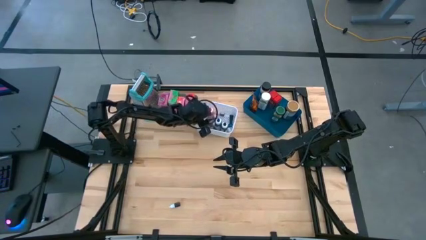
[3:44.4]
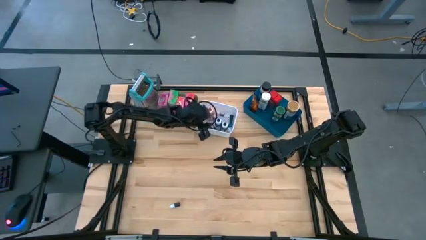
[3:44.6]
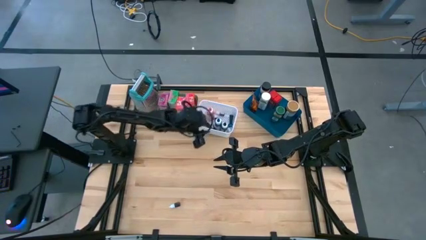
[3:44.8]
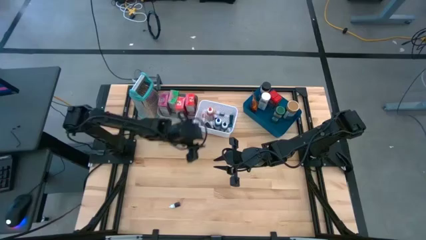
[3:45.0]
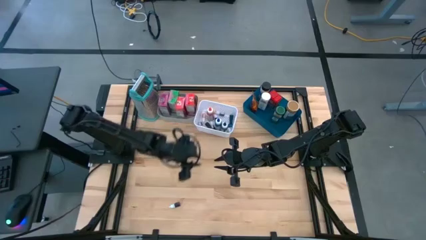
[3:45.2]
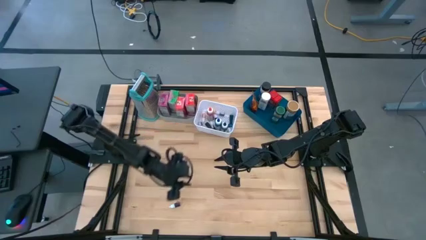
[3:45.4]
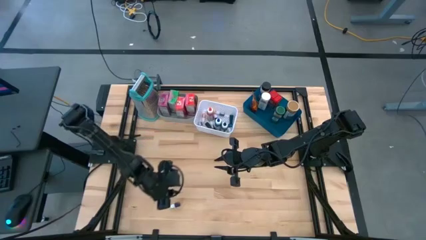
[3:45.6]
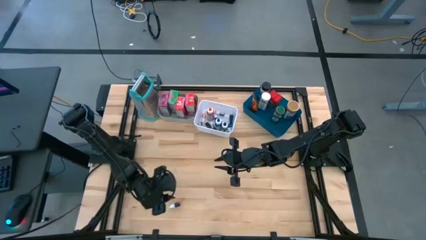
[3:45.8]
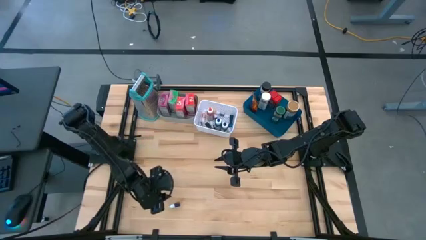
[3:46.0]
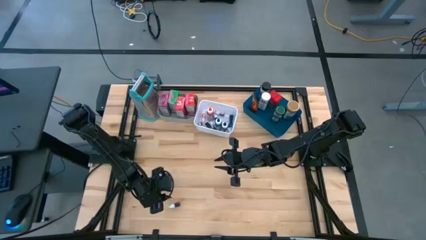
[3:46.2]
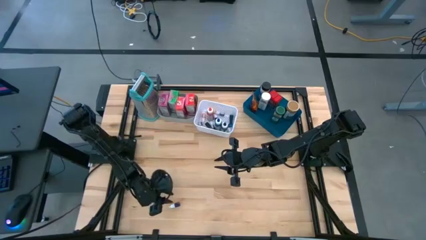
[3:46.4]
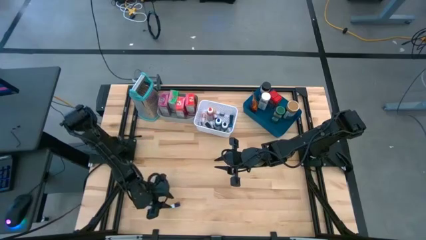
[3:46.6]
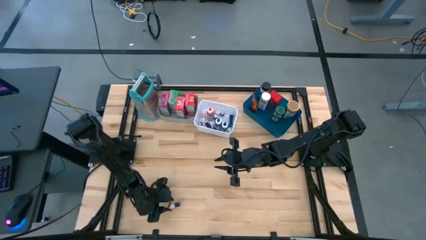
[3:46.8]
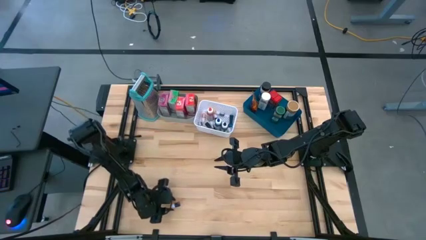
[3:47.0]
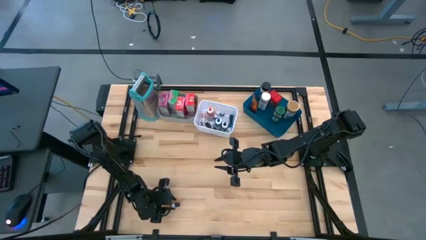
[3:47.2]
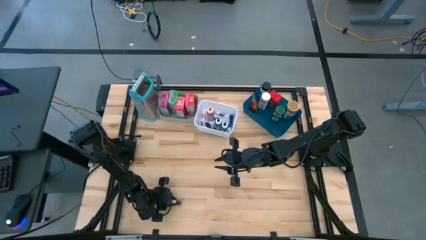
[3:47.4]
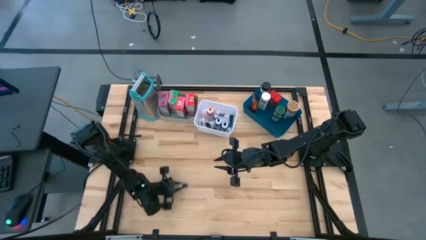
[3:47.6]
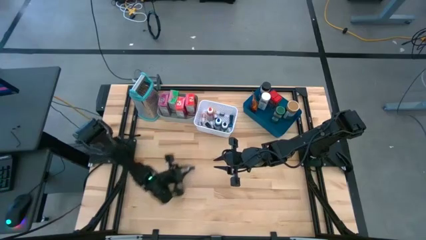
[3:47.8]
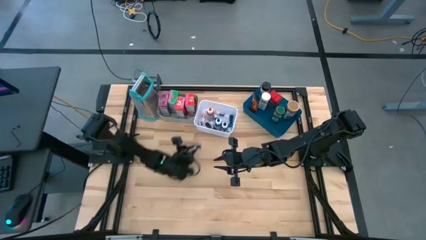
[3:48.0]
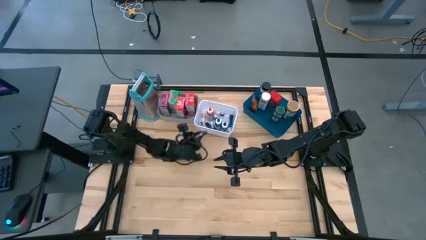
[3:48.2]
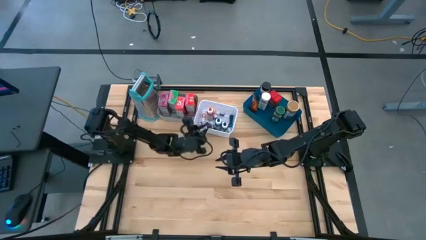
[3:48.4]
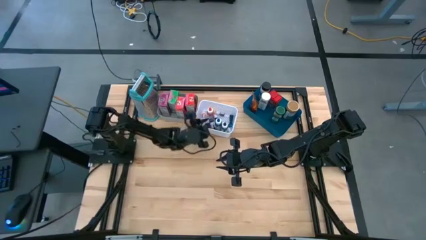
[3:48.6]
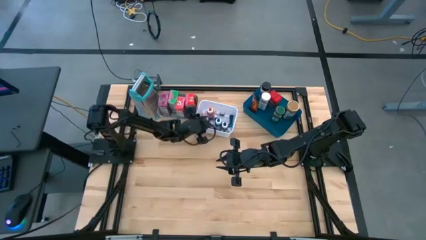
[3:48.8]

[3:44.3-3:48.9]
Task: Pick & Place Kitchen Items
Put the small red food coloring bottle into the white bin

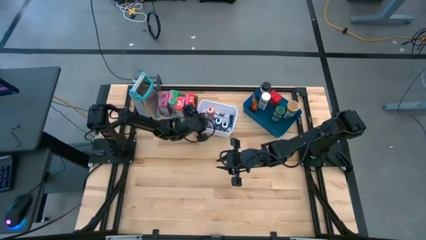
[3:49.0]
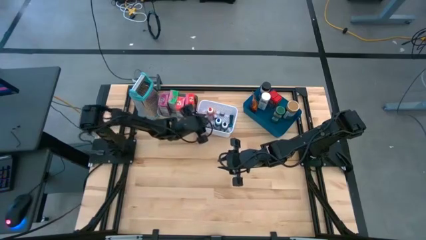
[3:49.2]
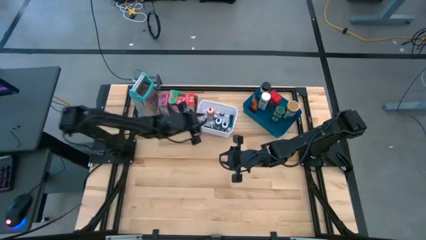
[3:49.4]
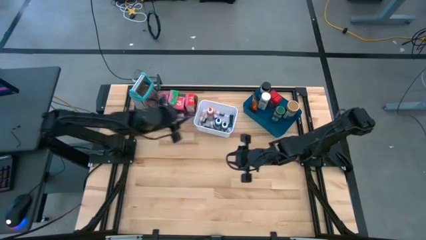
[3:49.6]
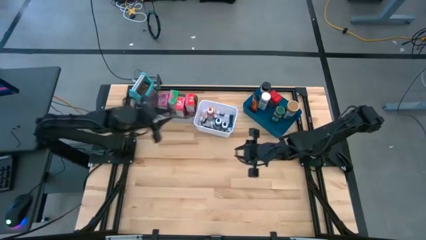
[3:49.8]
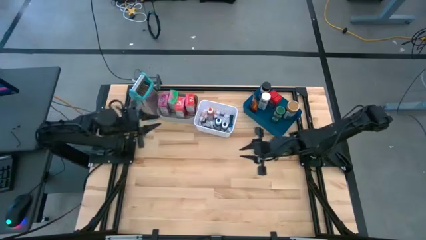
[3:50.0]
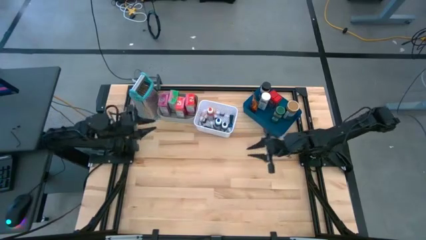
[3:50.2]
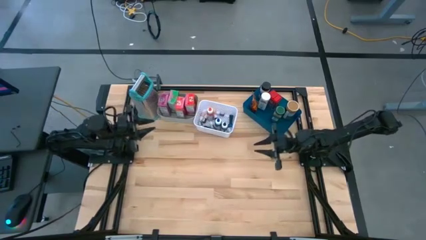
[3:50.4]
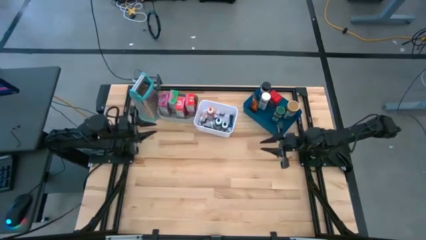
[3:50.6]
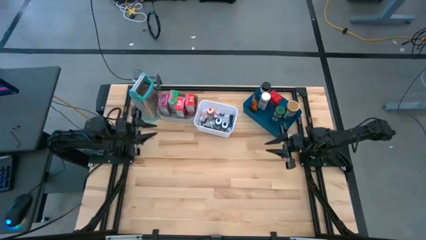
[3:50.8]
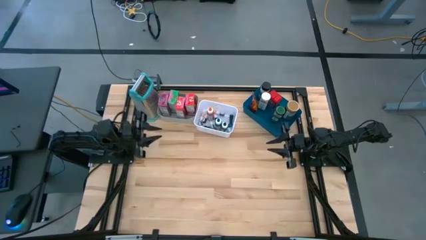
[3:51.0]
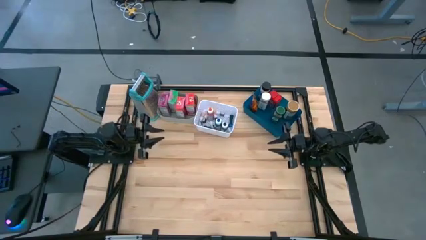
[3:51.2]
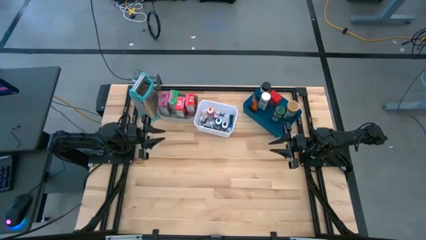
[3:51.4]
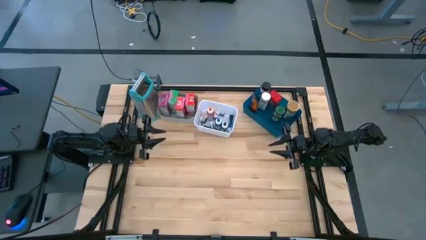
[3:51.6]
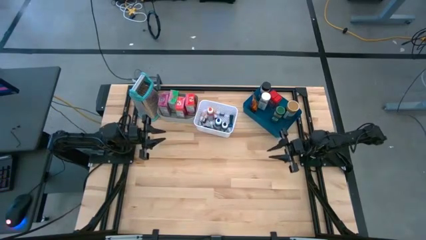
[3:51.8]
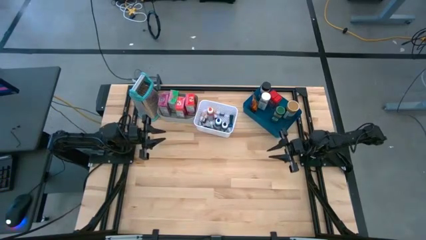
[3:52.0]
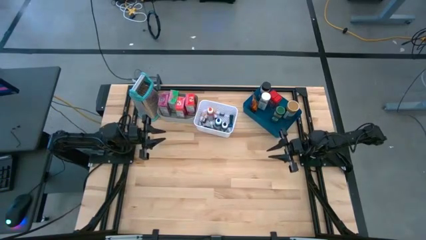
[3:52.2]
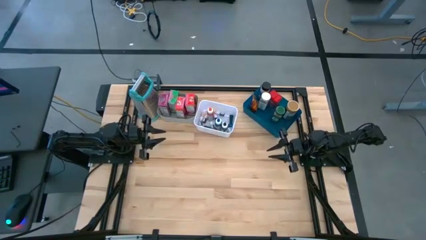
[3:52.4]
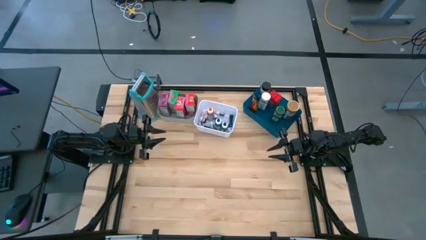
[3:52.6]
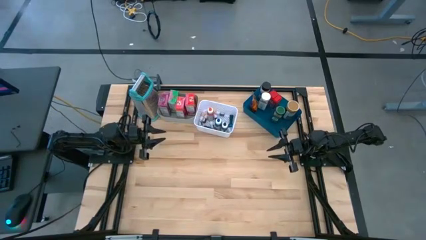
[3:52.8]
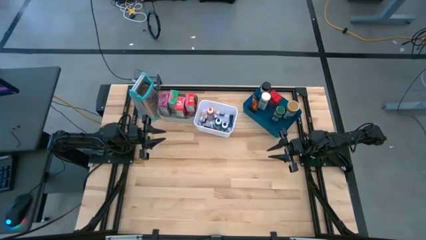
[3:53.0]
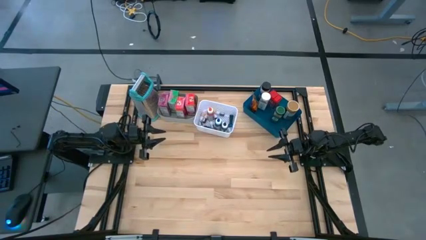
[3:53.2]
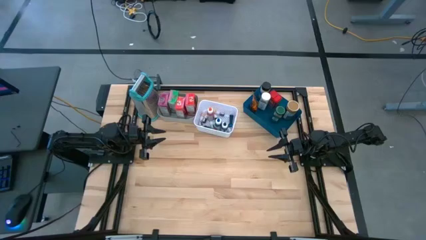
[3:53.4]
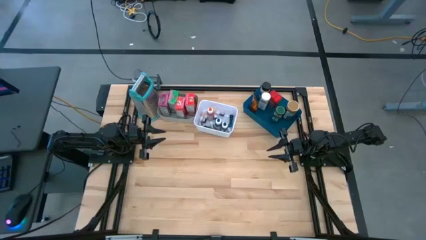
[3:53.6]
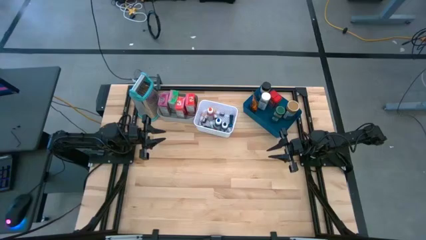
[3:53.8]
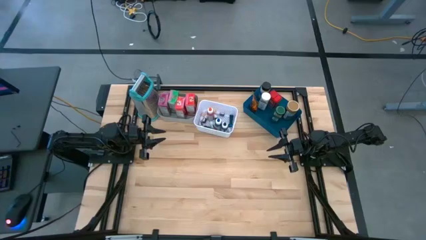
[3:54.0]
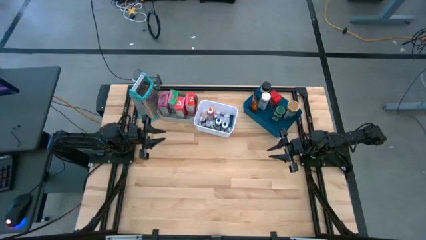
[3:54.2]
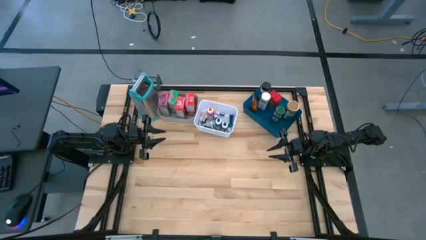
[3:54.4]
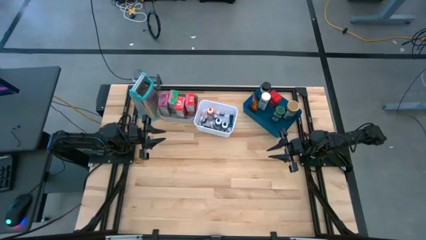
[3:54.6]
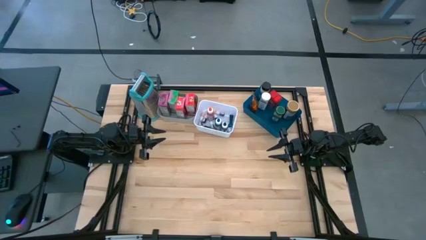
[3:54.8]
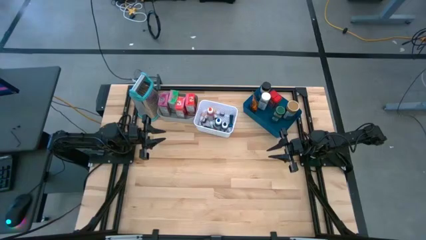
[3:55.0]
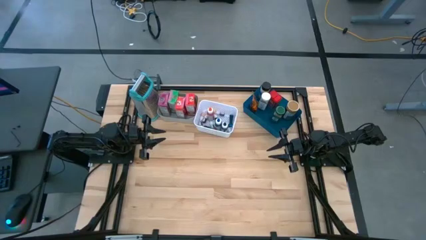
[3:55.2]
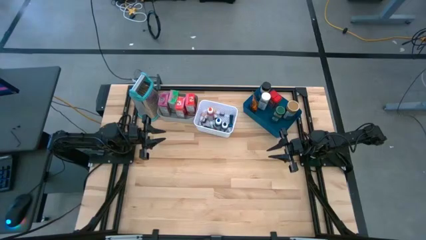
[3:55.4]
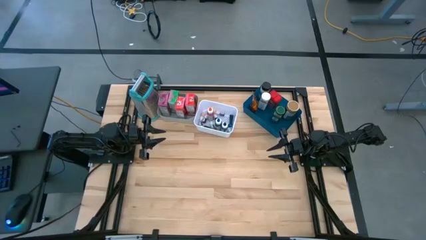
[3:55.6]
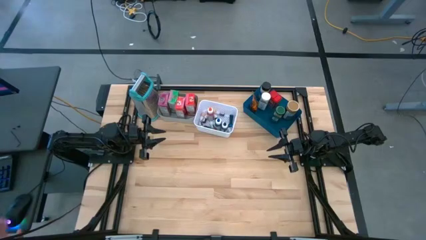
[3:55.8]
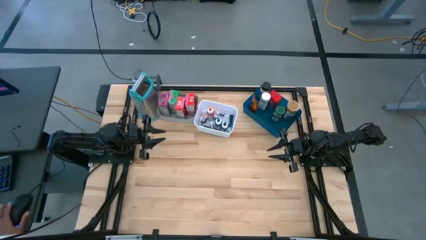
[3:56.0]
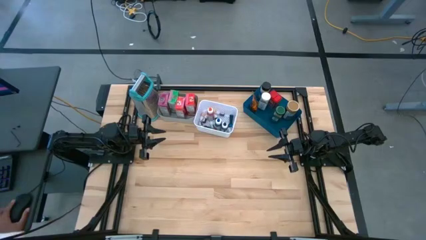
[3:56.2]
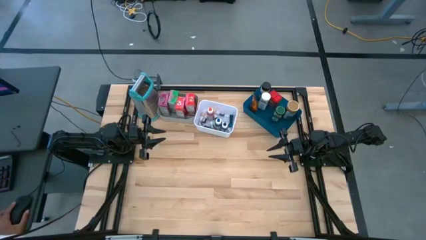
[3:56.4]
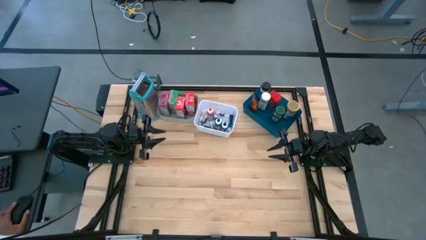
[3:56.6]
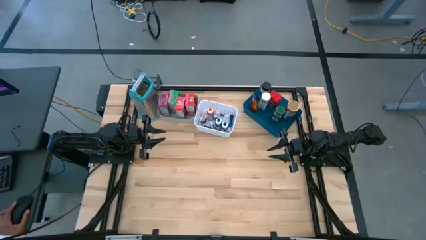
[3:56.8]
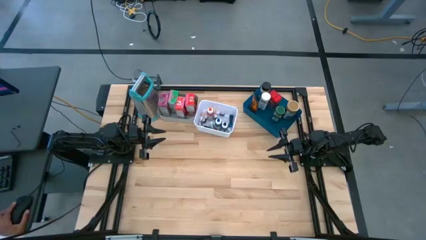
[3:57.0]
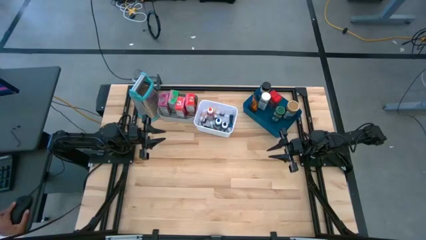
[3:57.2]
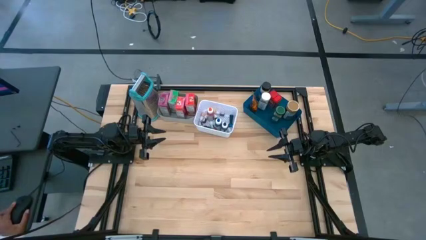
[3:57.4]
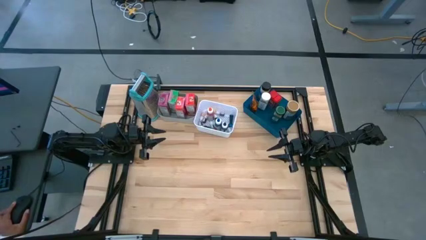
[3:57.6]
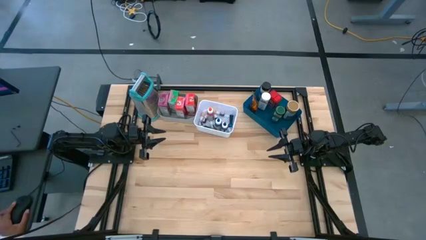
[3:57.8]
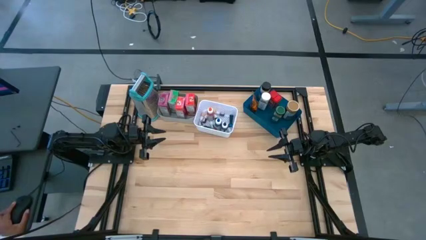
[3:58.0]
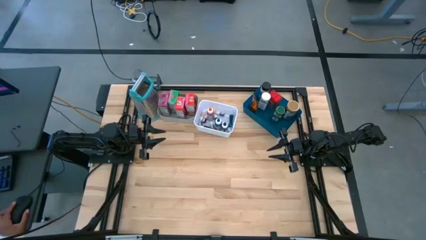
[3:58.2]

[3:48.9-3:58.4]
Return to Home Position
